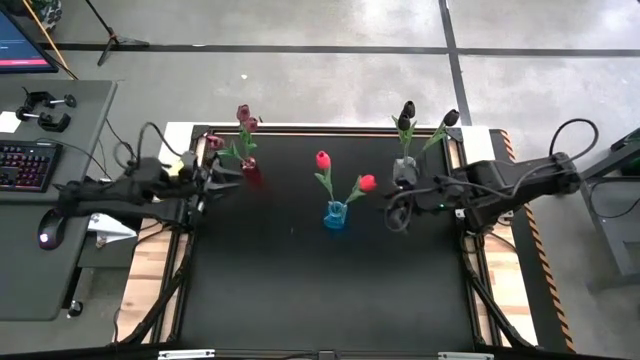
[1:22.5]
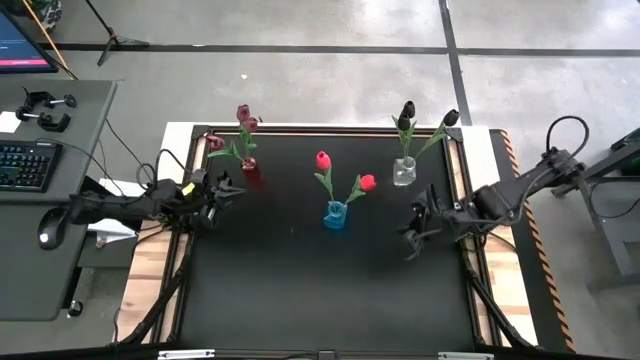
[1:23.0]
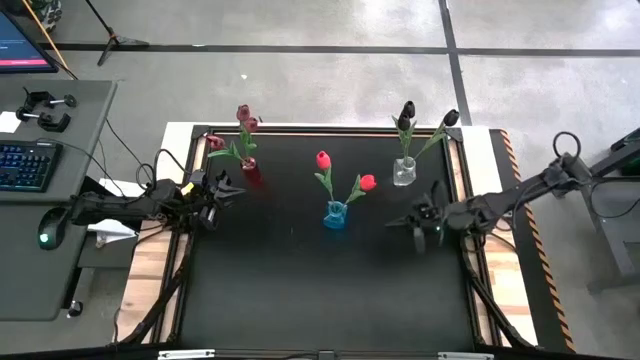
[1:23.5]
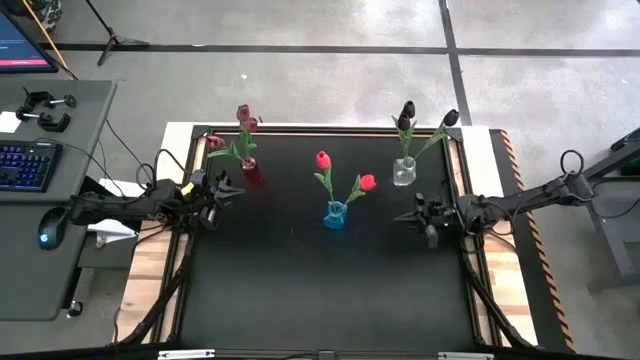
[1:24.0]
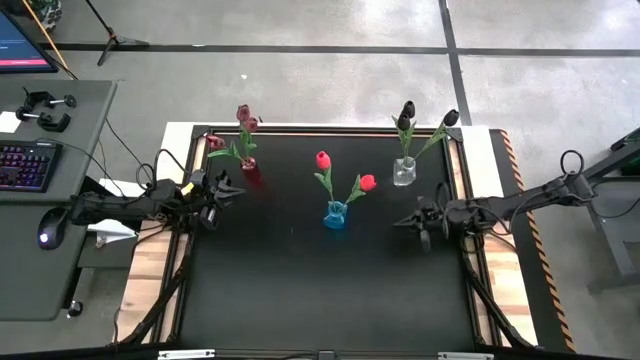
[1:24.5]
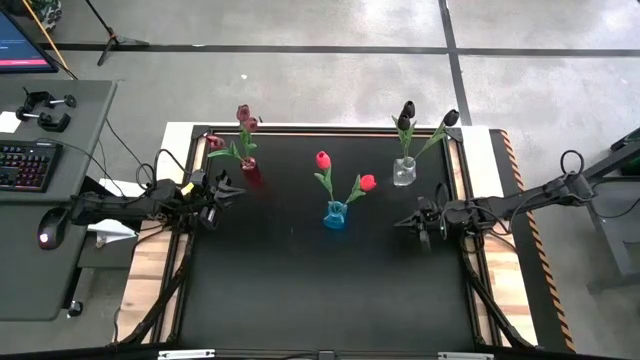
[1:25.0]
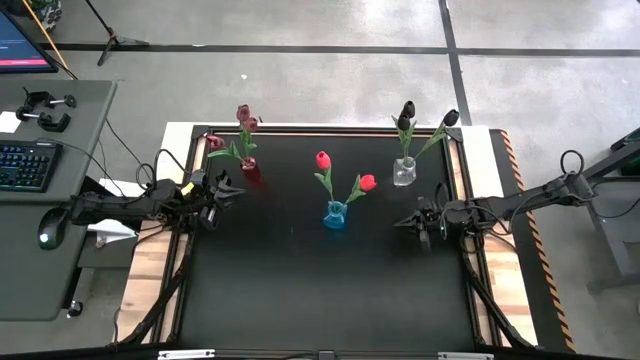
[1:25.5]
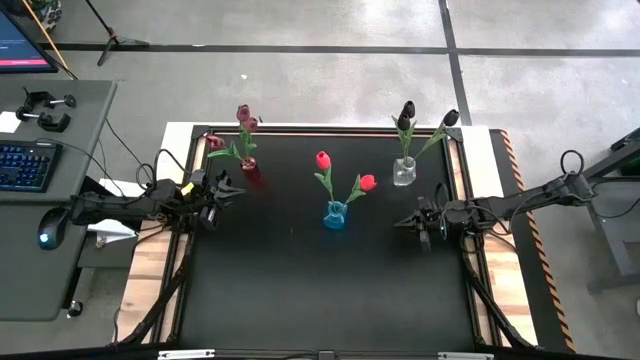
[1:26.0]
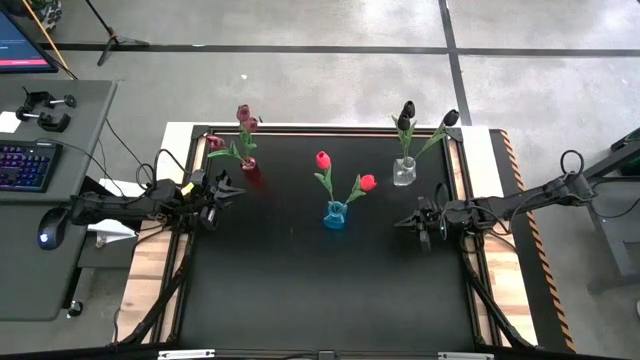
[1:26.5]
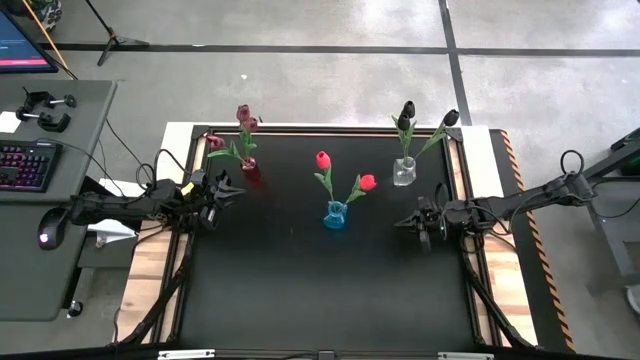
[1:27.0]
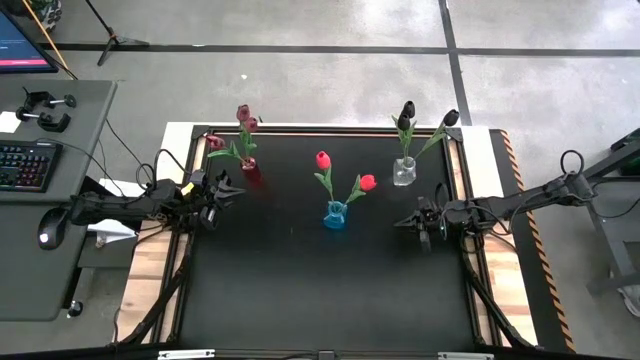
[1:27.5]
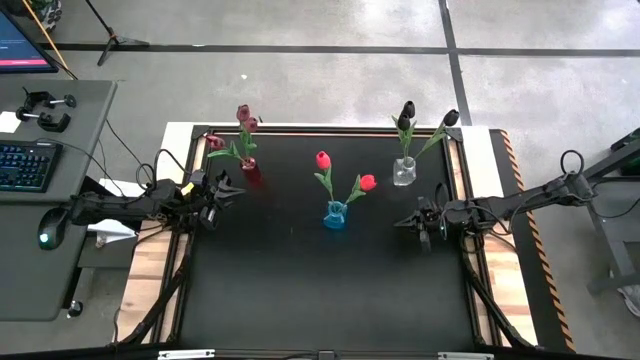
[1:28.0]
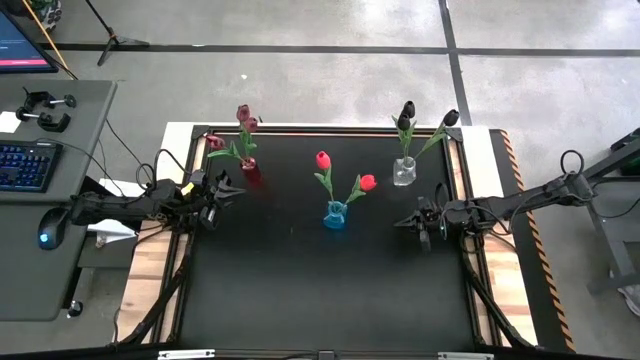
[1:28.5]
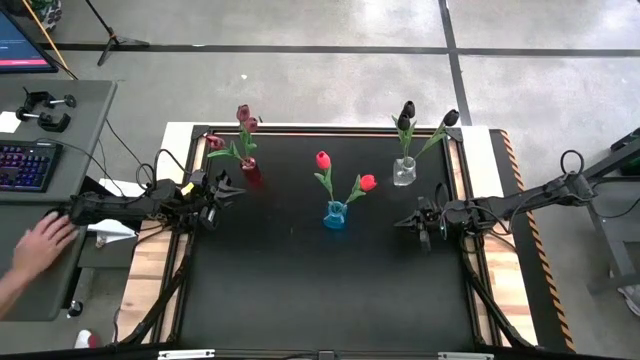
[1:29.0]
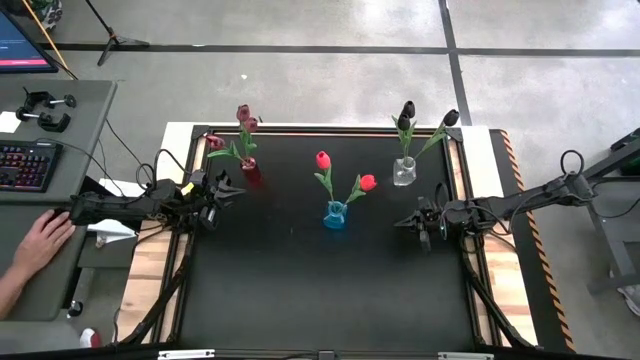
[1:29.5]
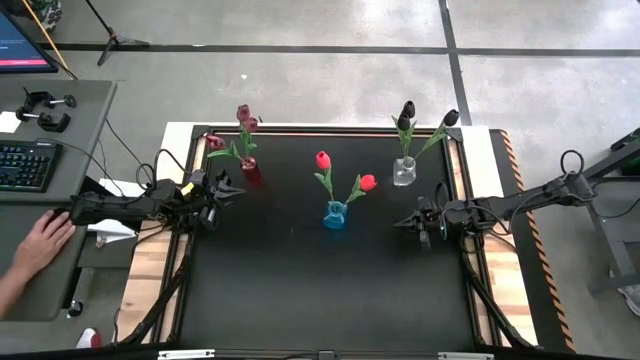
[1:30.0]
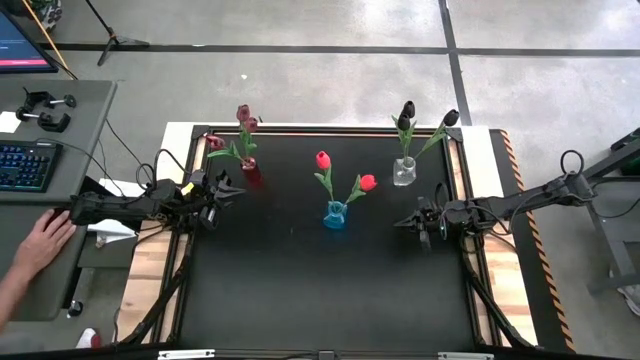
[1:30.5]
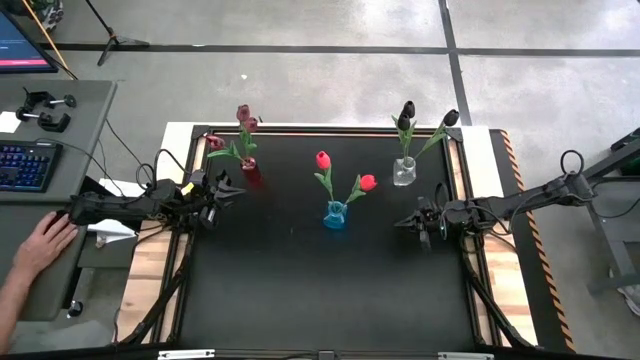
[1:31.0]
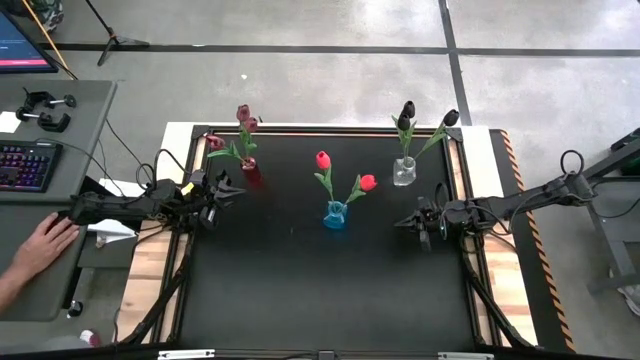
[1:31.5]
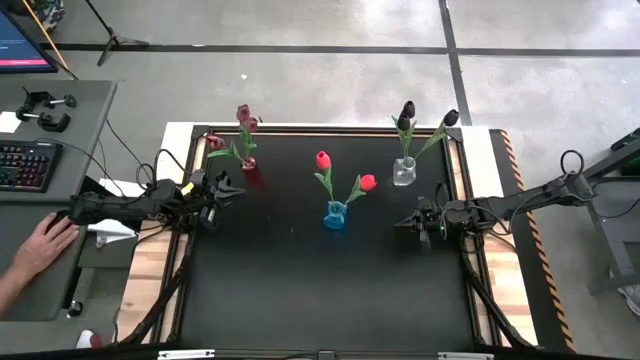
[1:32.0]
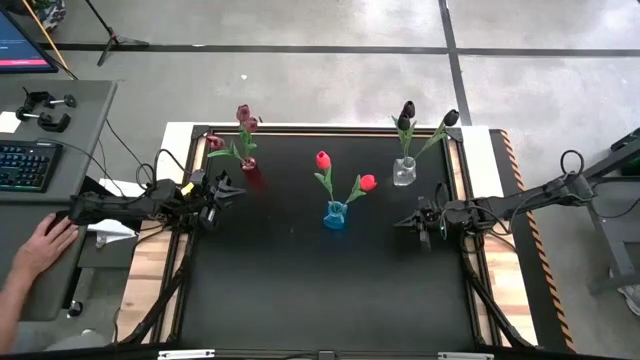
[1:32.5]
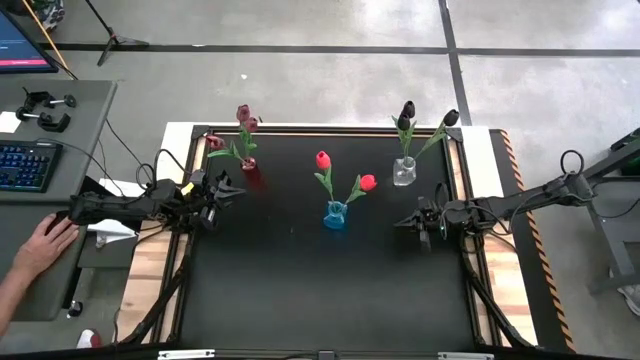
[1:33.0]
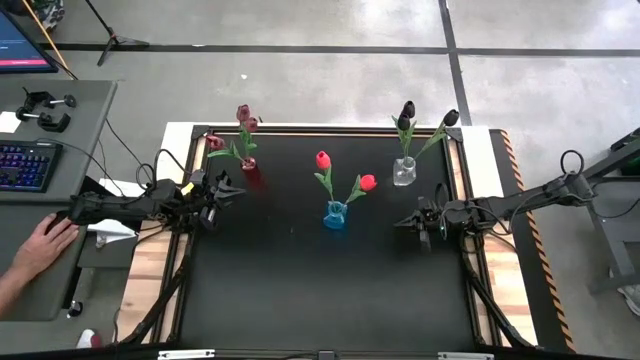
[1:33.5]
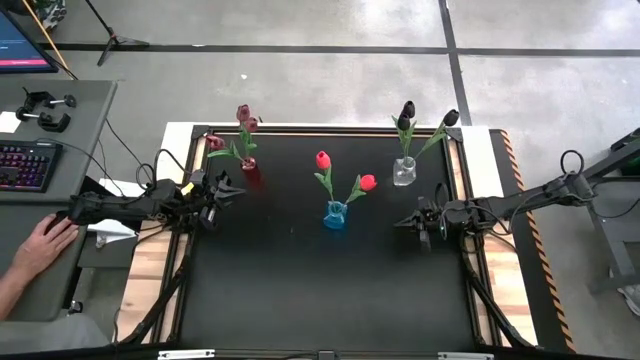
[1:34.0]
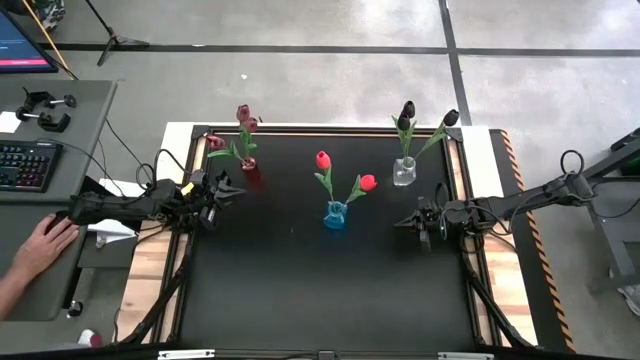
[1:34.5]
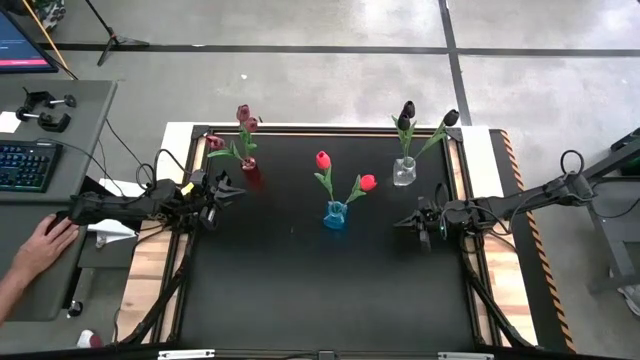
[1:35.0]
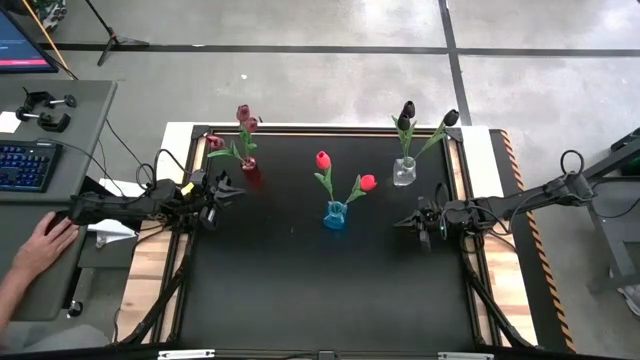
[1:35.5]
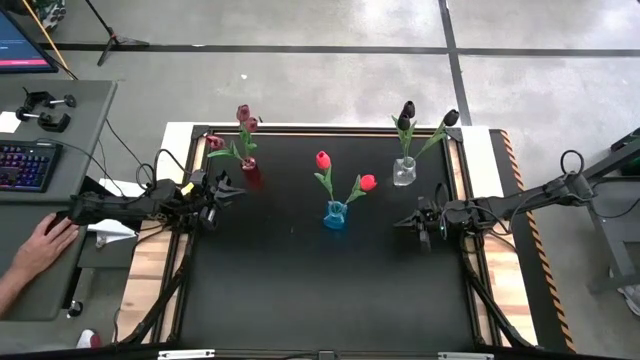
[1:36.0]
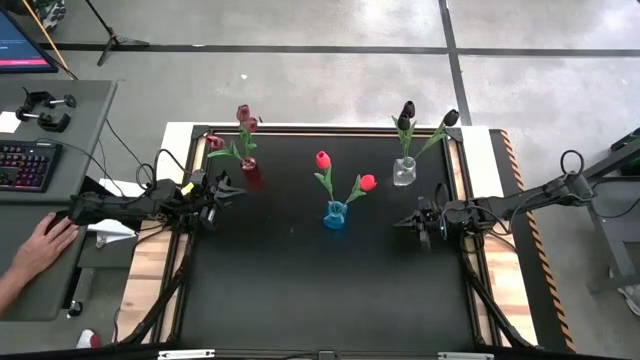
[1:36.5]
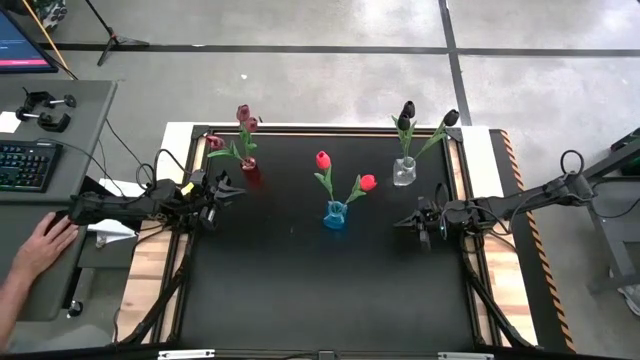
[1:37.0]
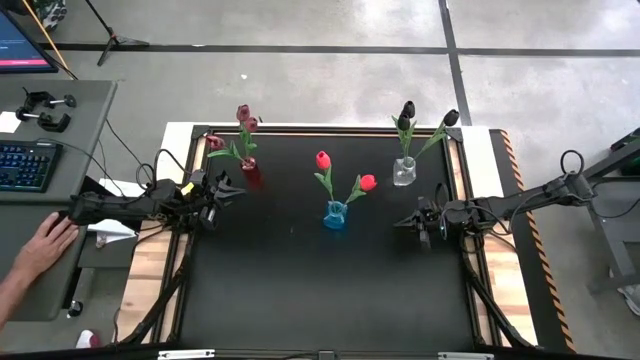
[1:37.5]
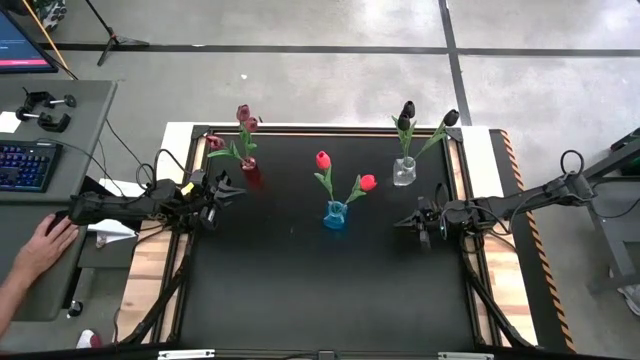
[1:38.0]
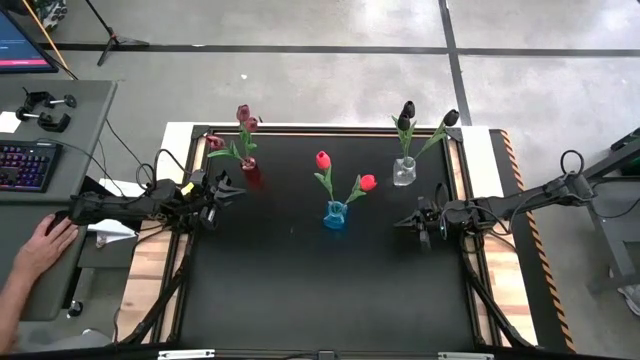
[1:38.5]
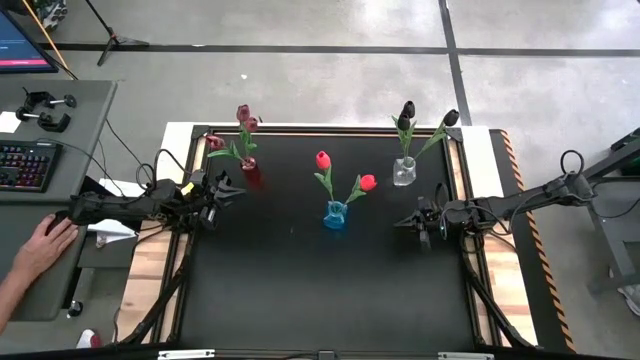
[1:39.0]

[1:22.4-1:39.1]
Task: Sort flowers into vase by color
Return to Home Position

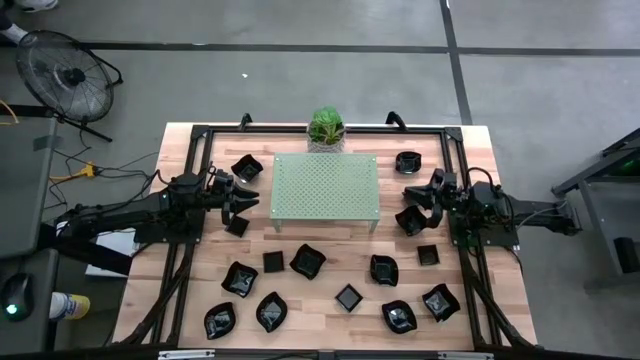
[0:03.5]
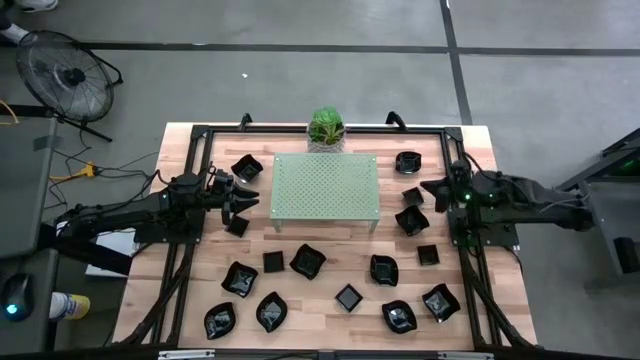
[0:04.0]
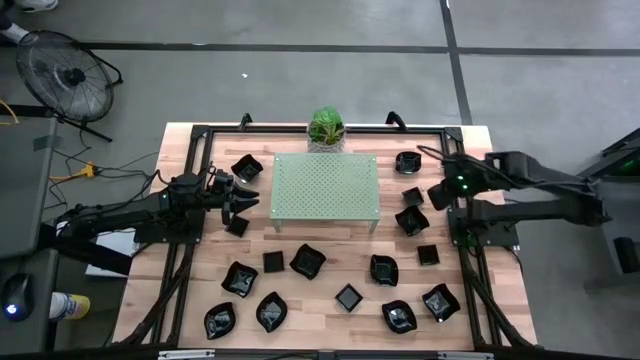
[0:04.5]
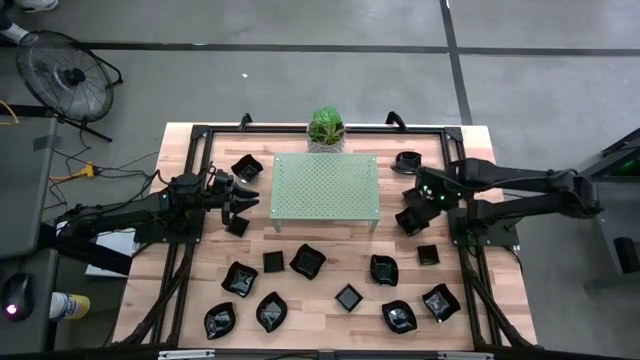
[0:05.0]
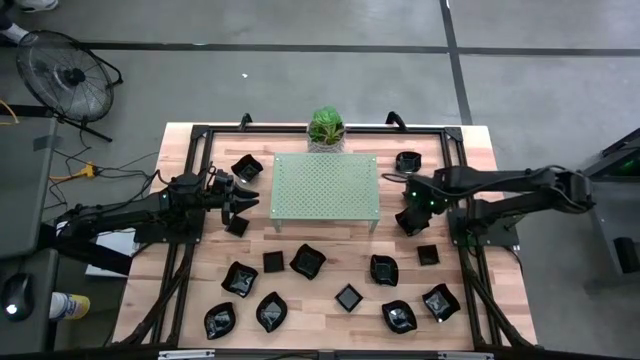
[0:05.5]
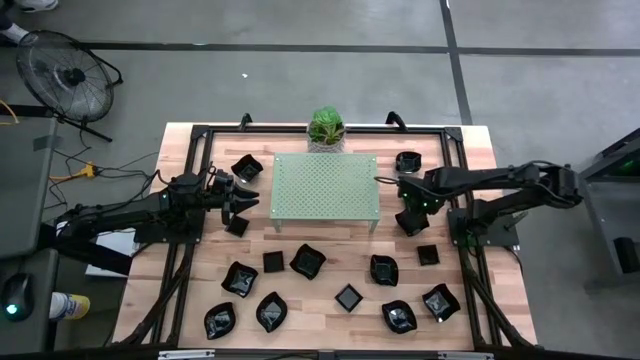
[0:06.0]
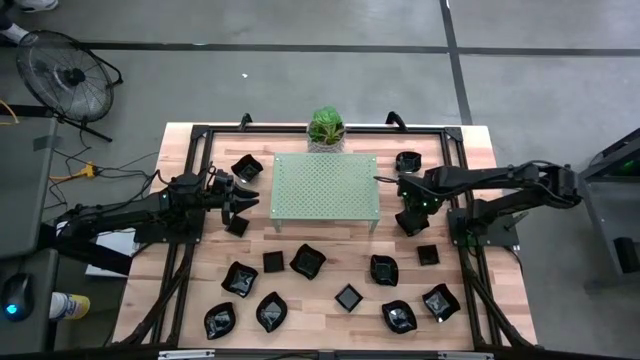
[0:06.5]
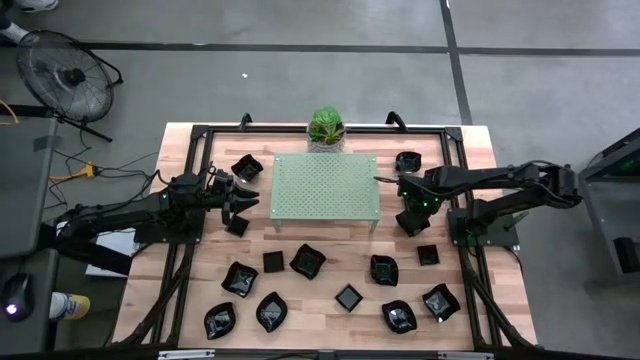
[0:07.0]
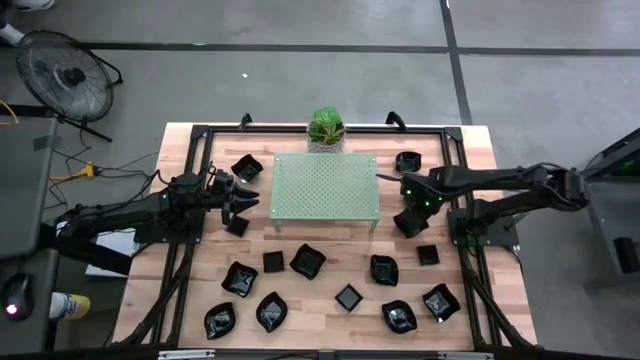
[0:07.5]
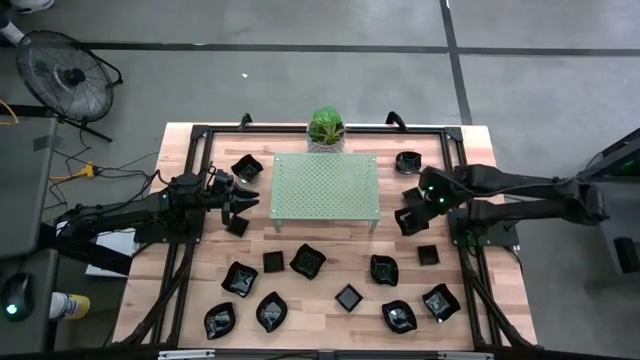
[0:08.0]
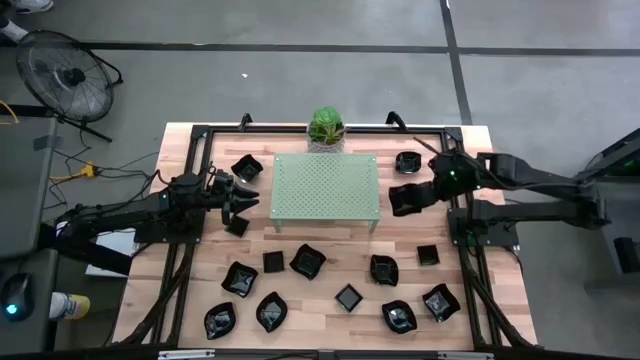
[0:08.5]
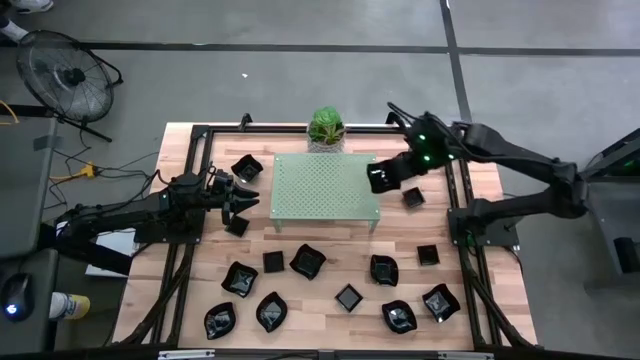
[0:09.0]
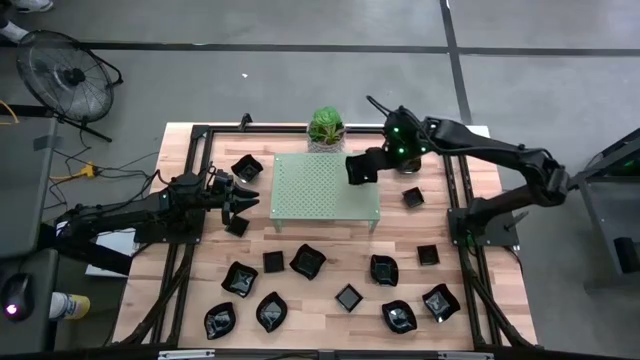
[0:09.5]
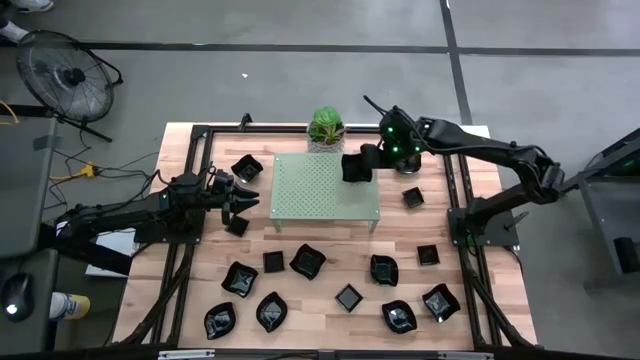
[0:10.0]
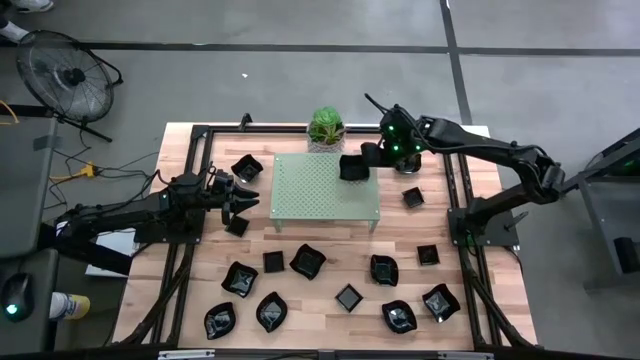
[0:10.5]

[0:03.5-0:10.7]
Task: Pick & Place Mini shaped plates
Put the black distorted square plate on the shelf
